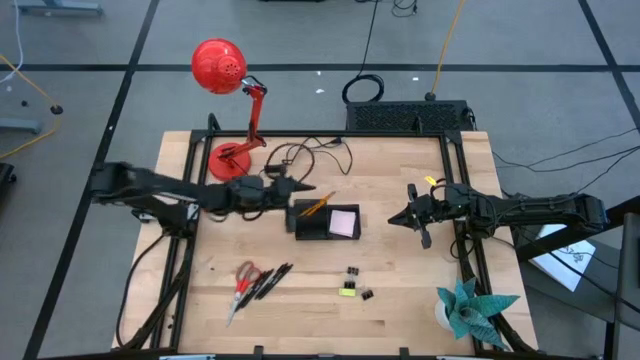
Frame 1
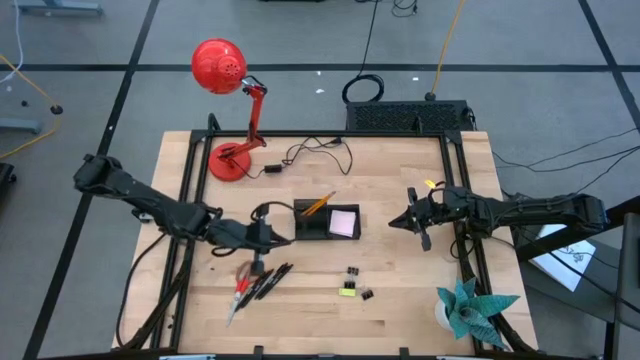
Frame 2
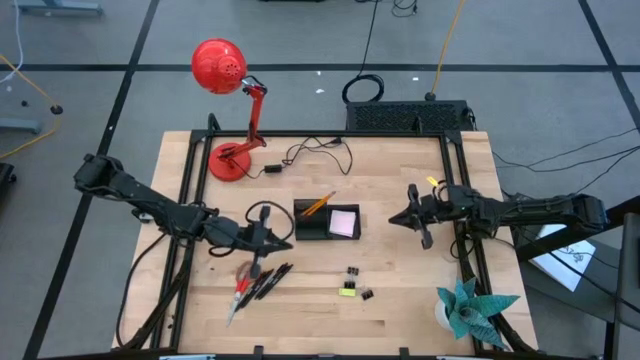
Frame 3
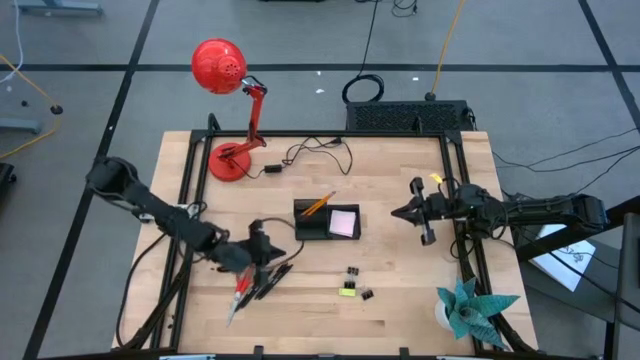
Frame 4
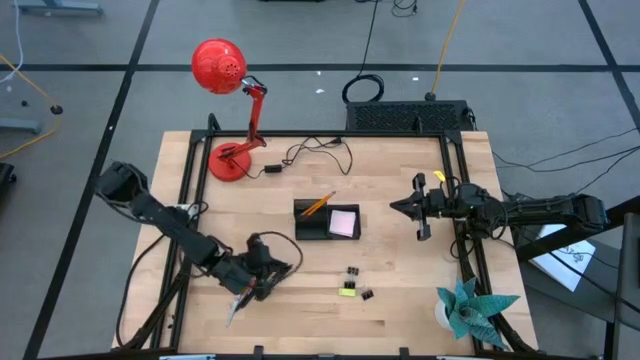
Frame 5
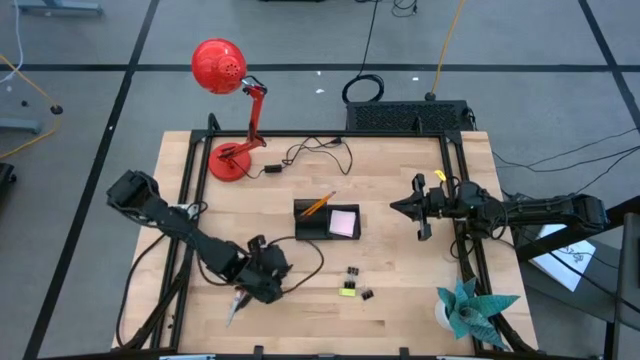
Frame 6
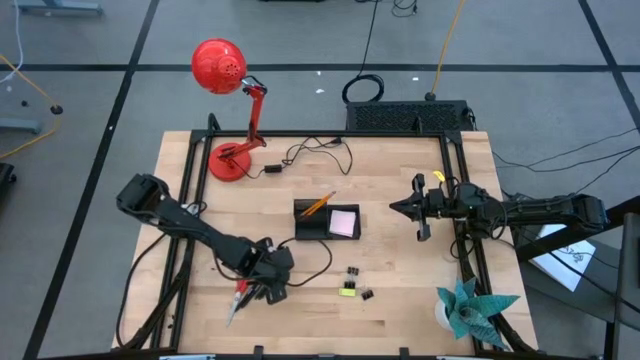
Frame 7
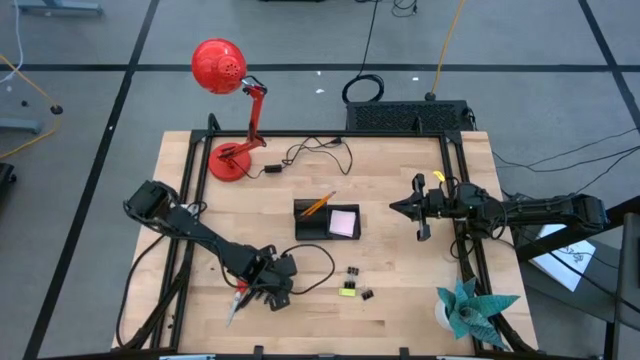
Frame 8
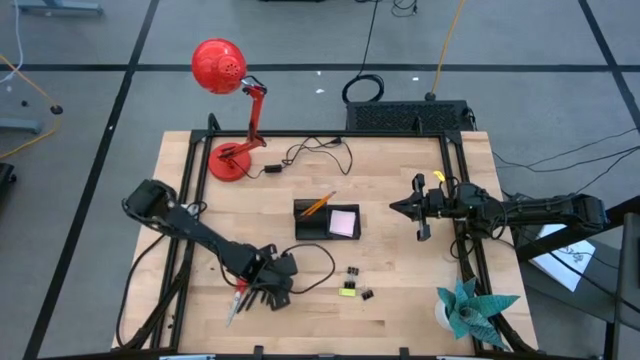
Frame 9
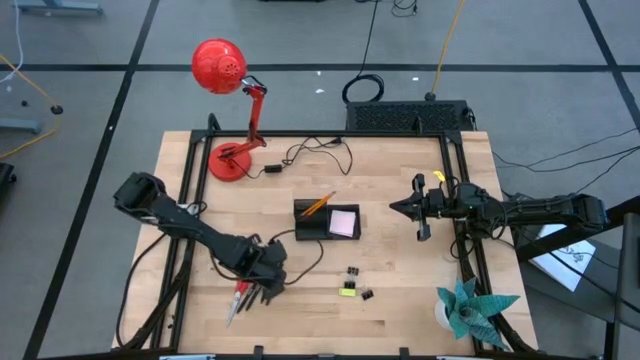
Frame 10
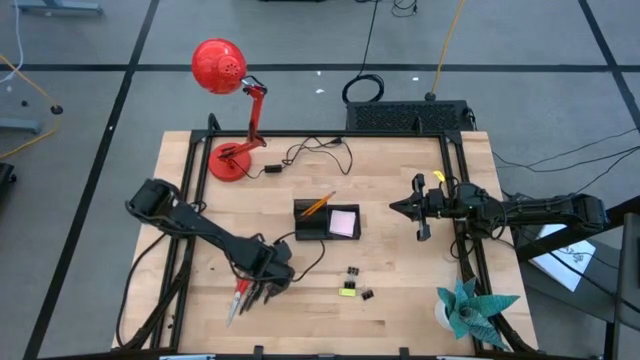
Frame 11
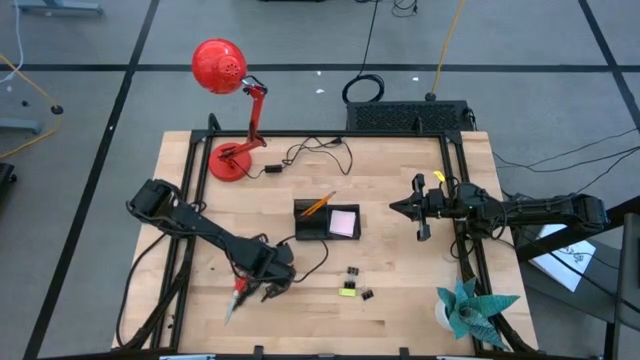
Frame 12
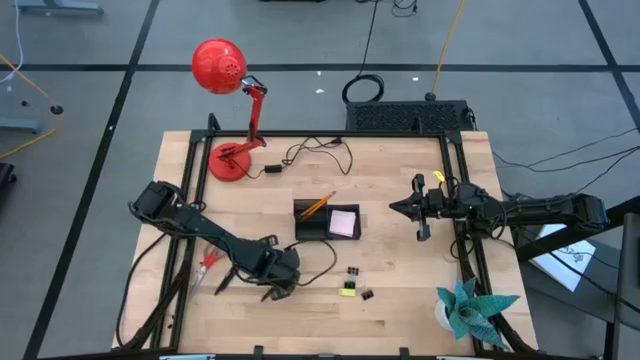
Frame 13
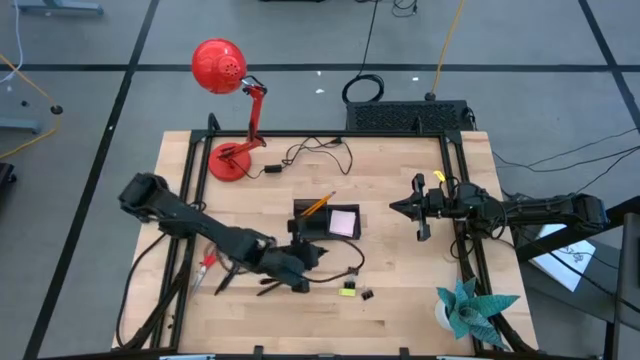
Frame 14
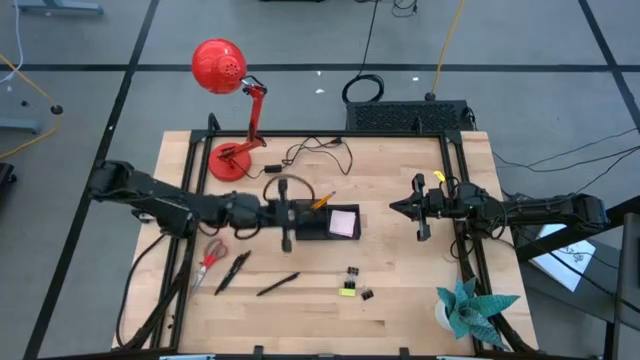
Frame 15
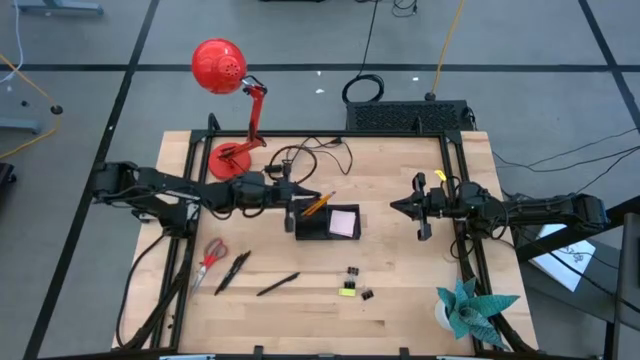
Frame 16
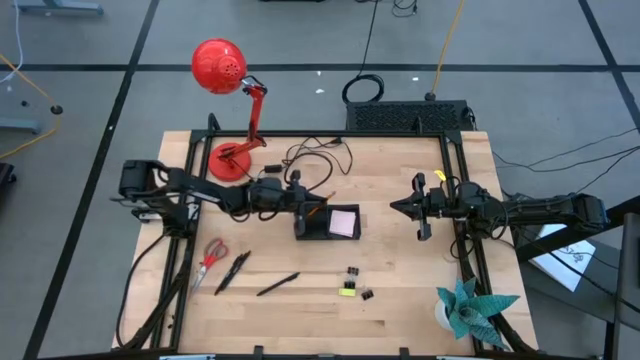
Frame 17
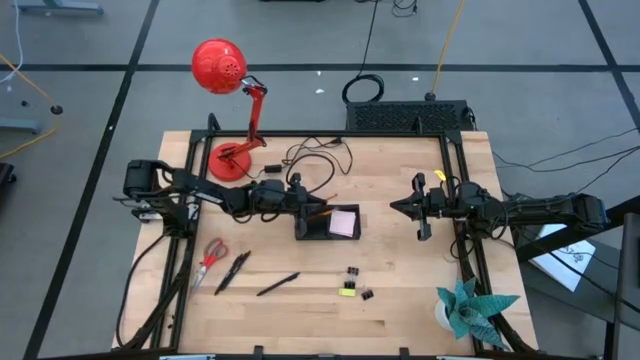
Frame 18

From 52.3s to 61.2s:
Task: Pick and place office supplies into organizer
Put the pen into the desk organizer

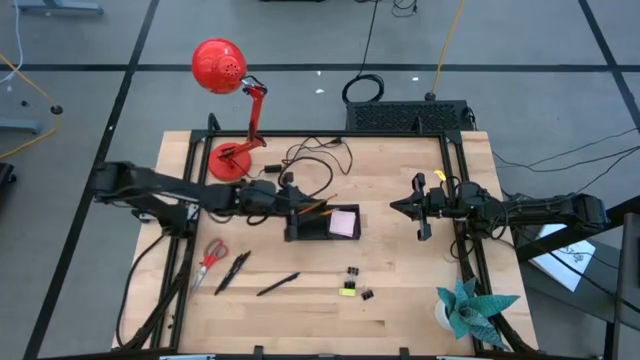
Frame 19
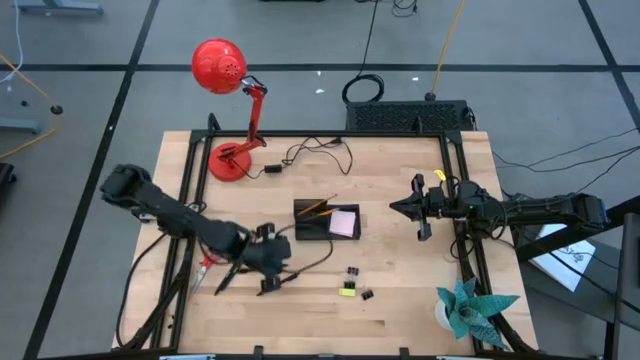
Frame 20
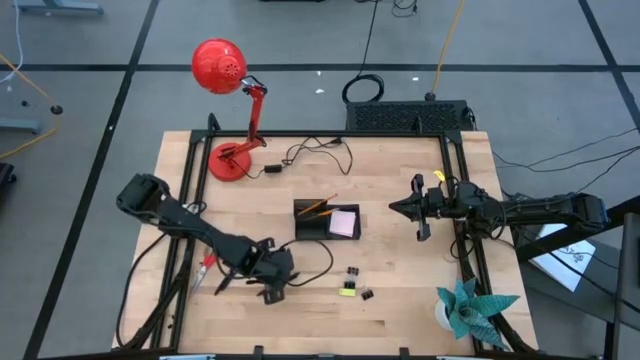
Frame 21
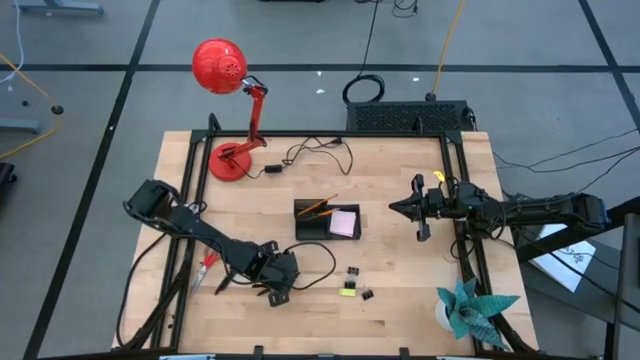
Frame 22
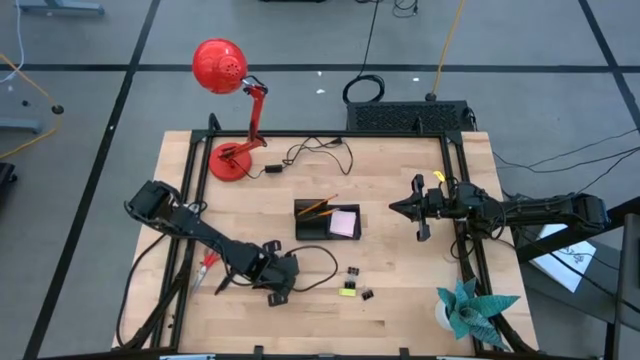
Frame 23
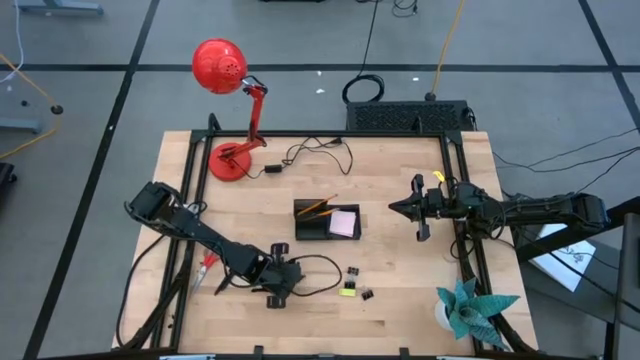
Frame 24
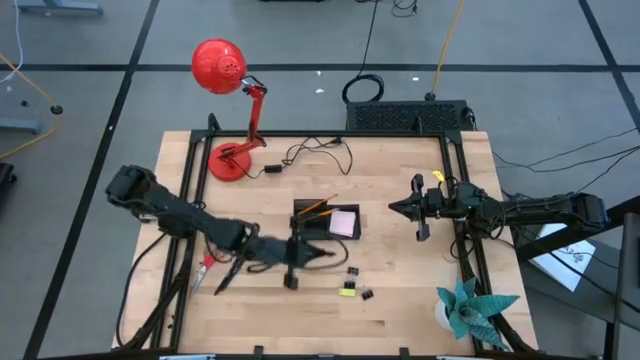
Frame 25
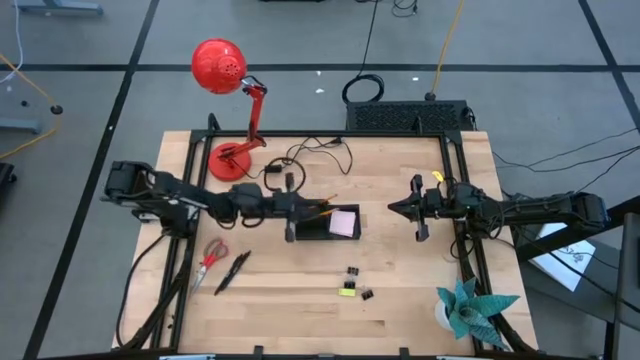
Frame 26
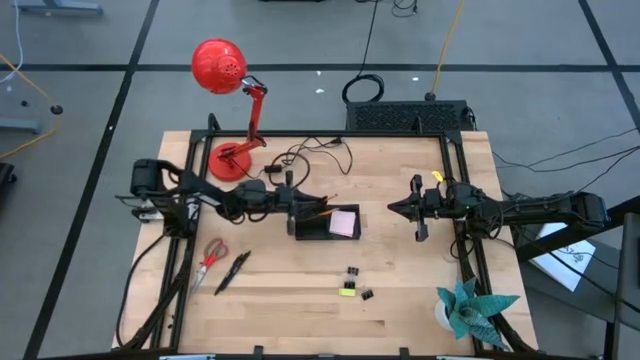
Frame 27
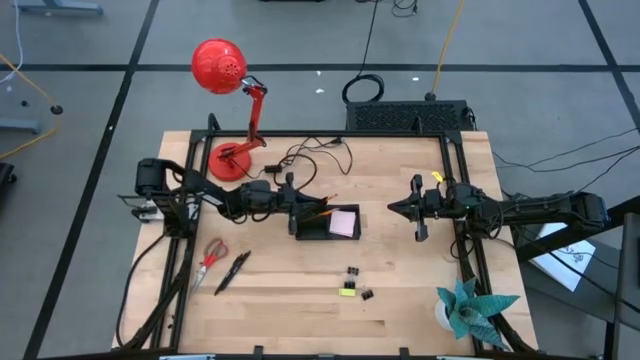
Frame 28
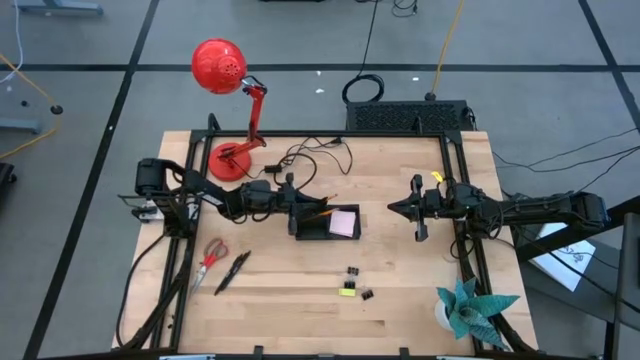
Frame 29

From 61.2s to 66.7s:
Put the pen into the desk organizer

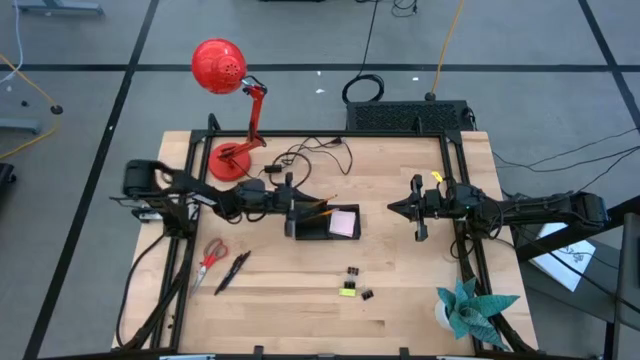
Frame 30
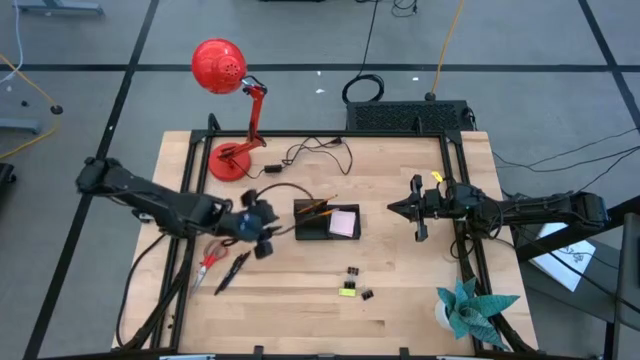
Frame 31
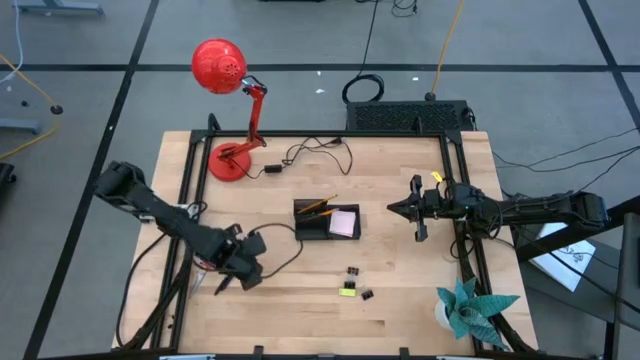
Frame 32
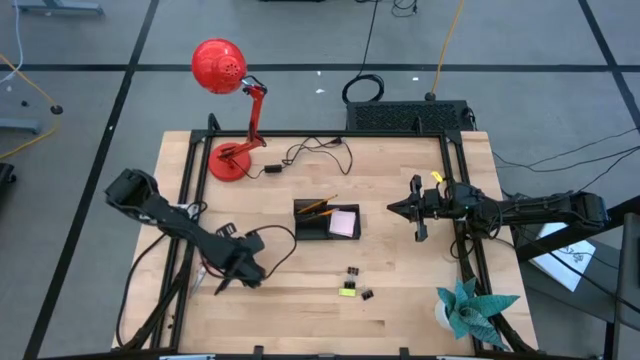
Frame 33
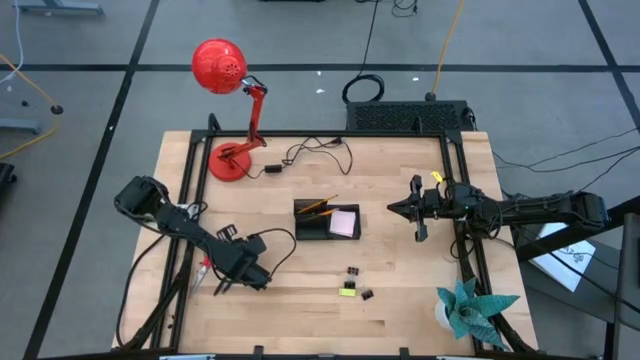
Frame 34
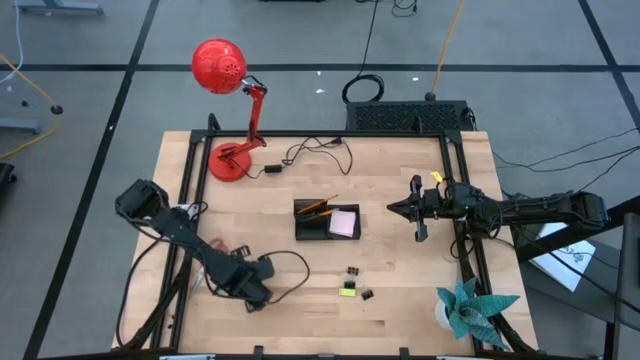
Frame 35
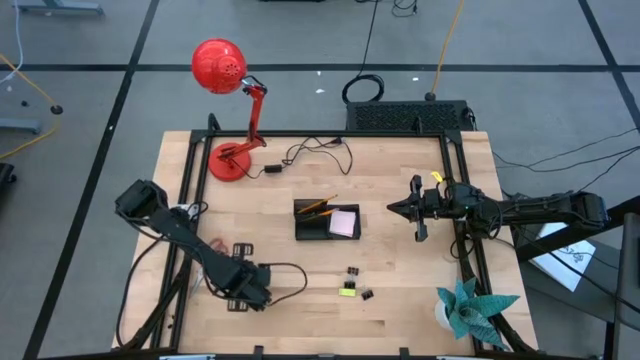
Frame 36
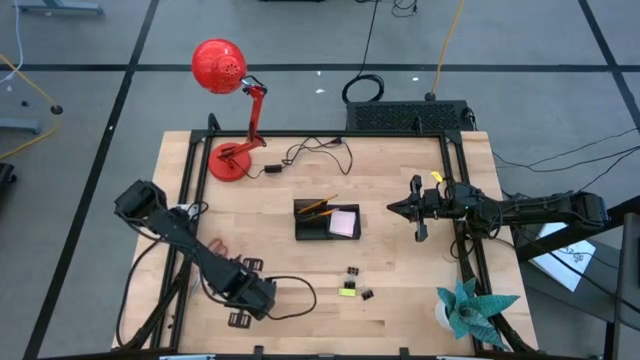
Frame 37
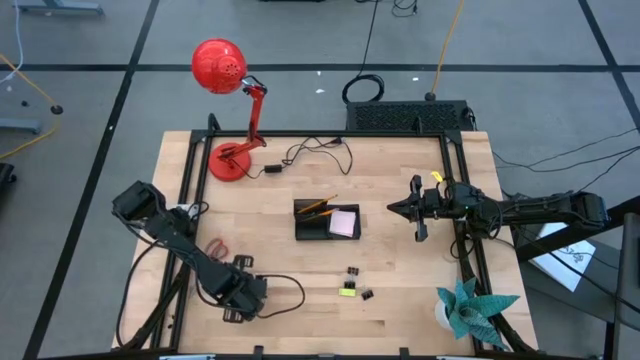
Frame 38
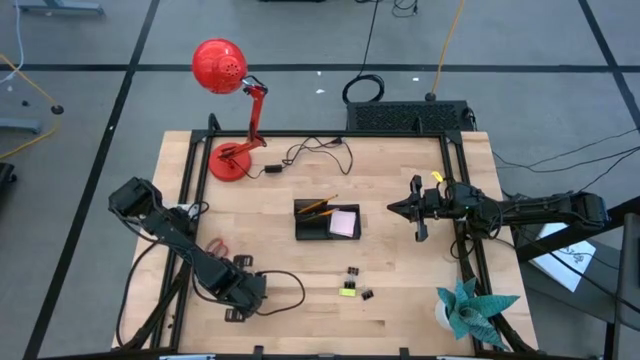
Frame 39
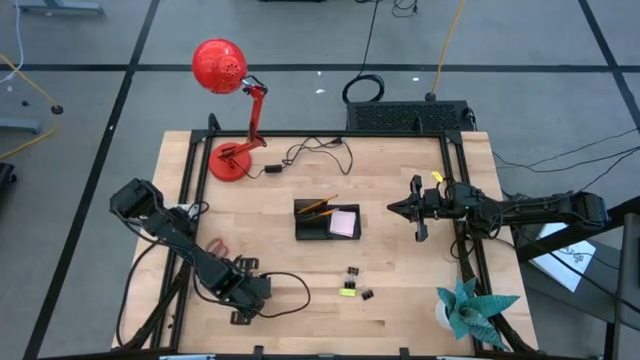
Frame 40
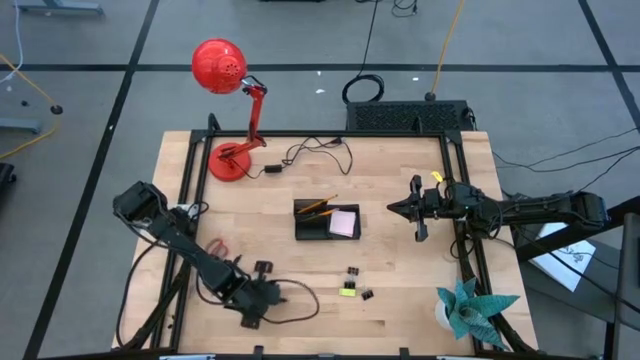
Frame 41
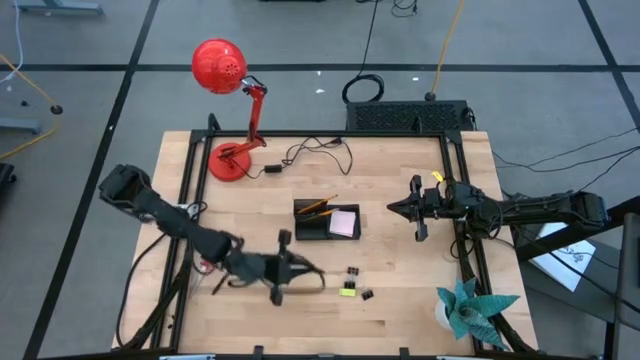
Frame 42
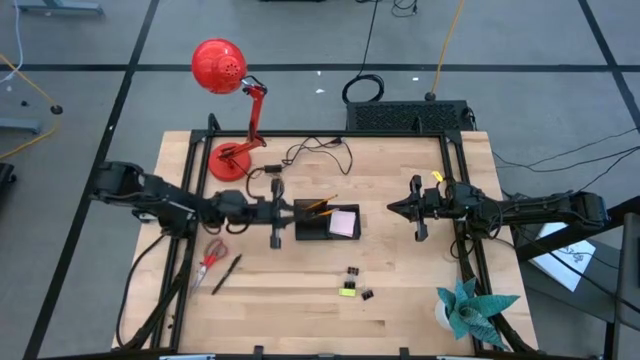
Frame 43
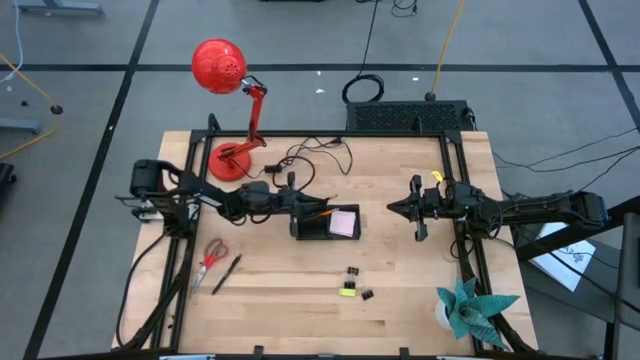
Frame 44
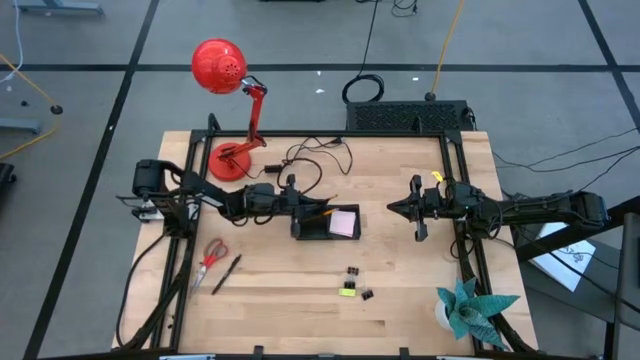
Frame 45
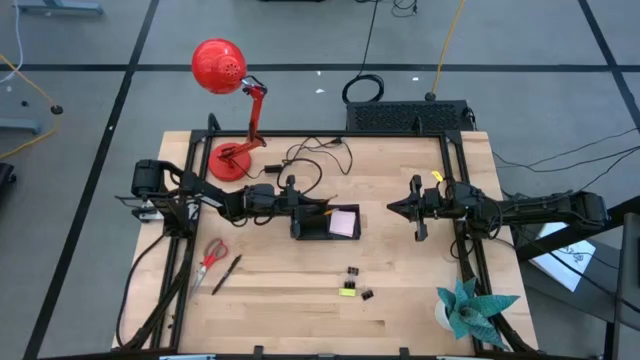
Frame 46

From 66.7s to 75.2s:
Put the pen into the desk organizer
